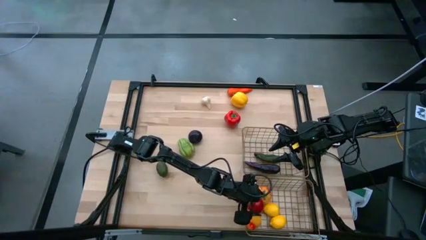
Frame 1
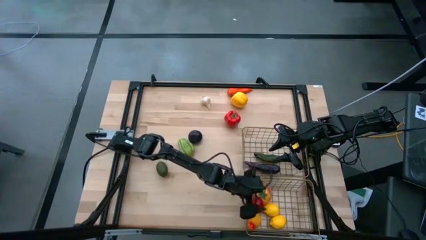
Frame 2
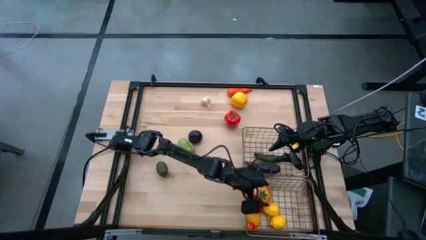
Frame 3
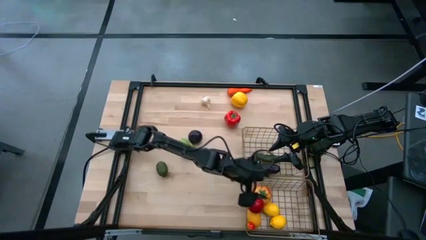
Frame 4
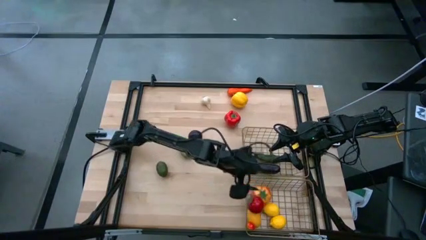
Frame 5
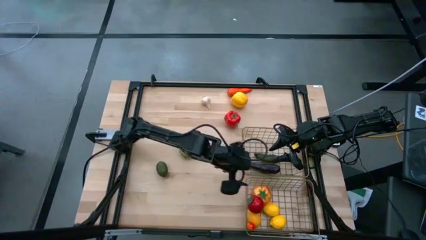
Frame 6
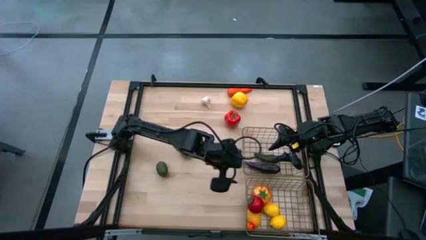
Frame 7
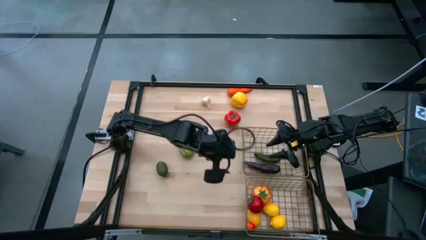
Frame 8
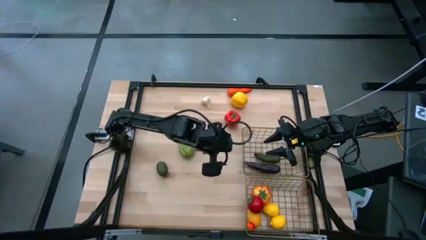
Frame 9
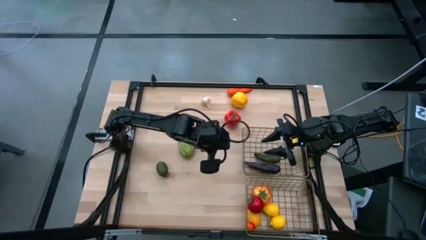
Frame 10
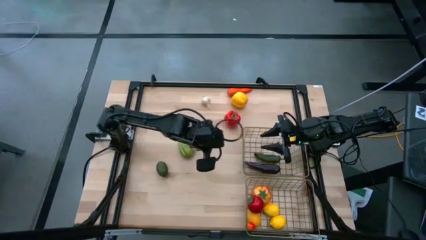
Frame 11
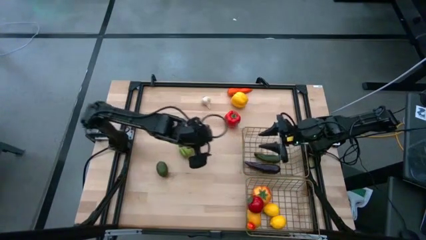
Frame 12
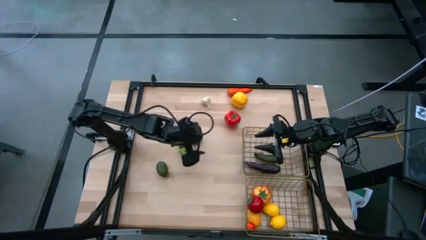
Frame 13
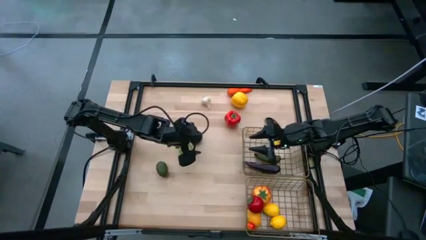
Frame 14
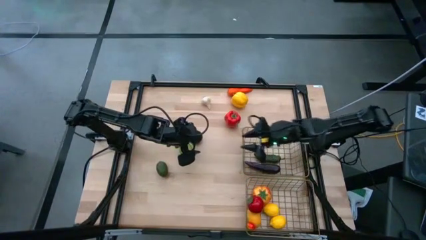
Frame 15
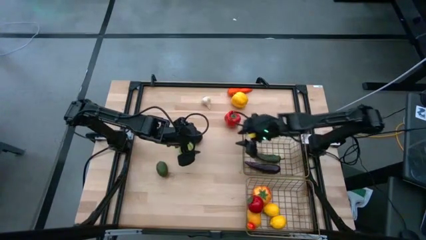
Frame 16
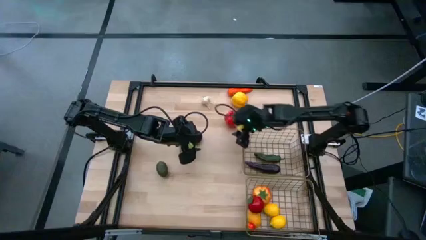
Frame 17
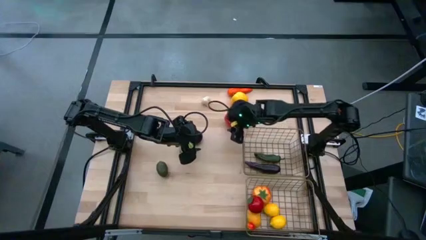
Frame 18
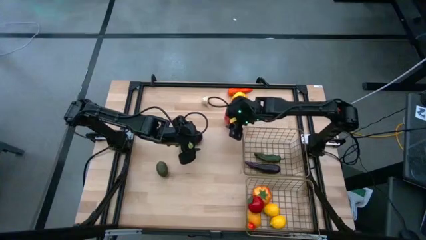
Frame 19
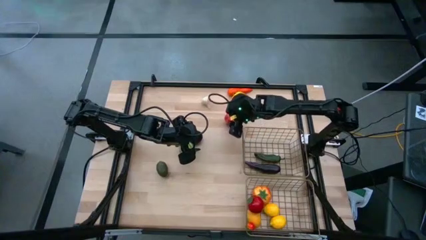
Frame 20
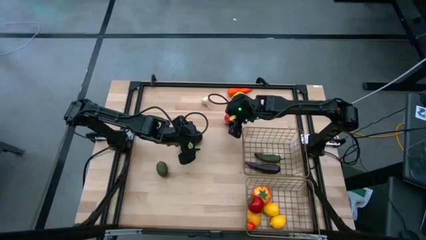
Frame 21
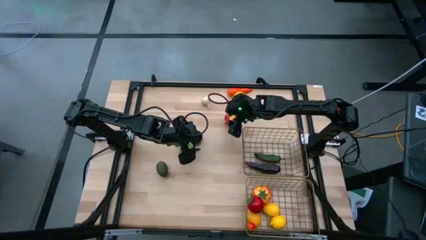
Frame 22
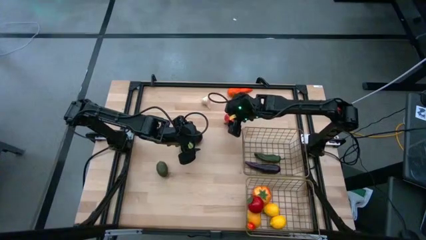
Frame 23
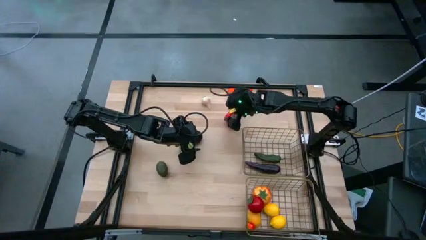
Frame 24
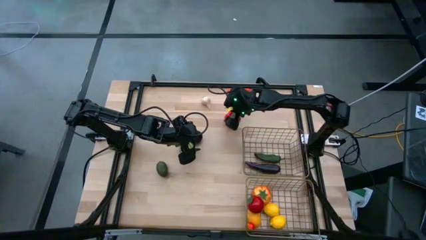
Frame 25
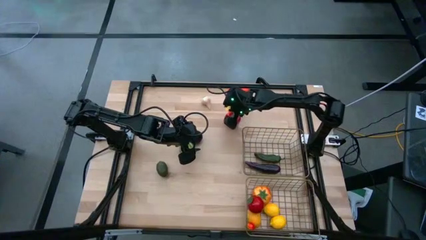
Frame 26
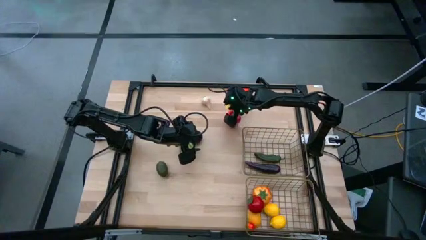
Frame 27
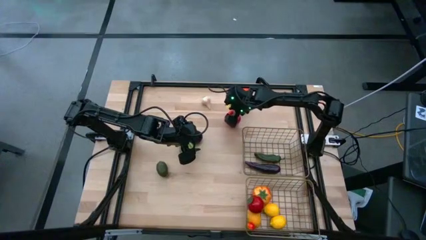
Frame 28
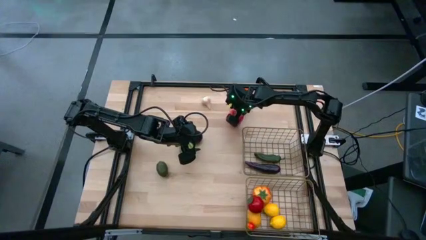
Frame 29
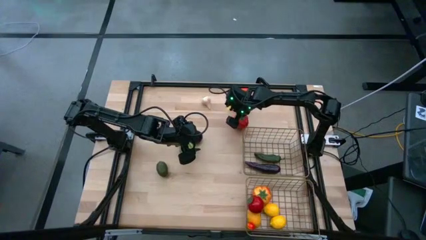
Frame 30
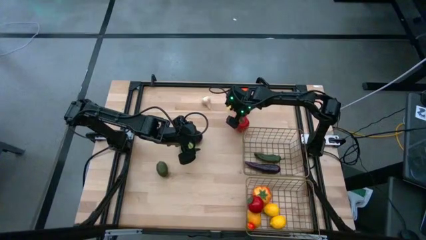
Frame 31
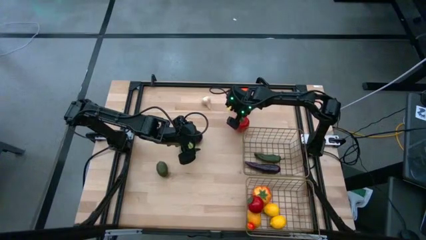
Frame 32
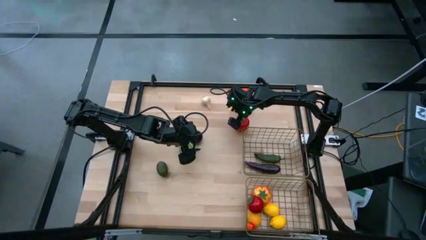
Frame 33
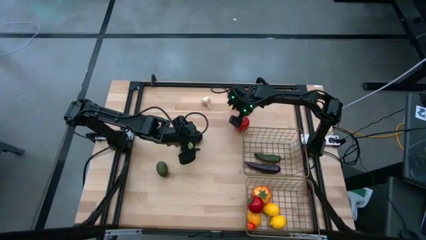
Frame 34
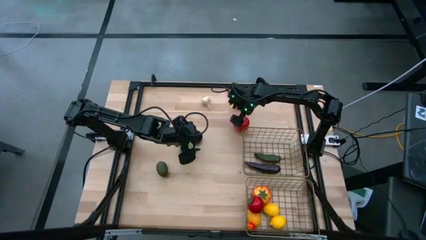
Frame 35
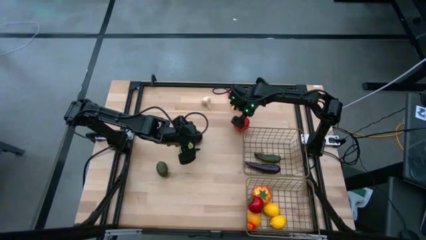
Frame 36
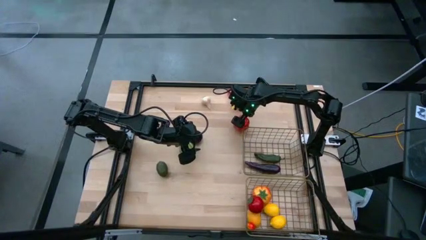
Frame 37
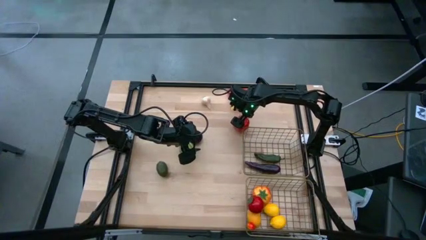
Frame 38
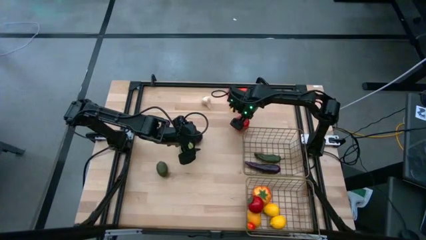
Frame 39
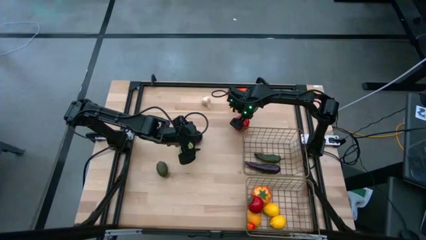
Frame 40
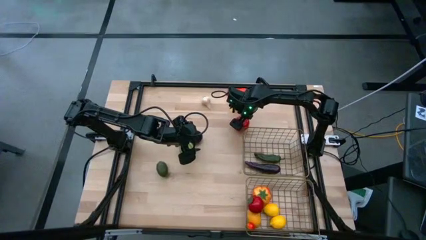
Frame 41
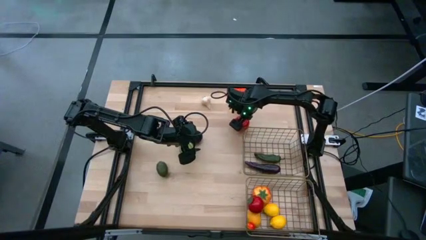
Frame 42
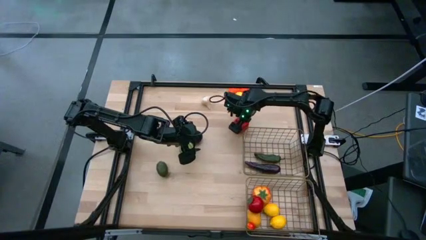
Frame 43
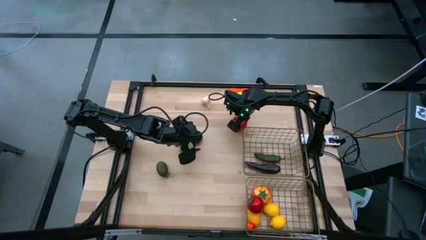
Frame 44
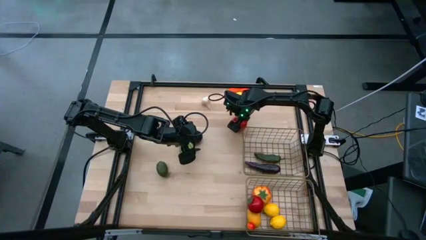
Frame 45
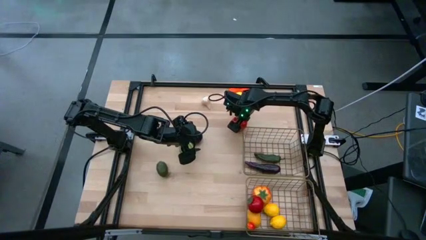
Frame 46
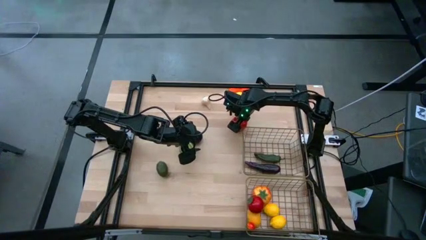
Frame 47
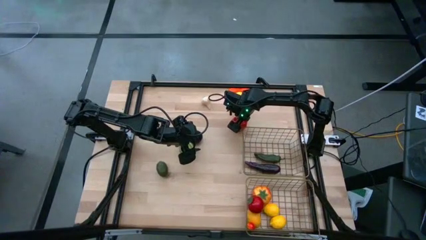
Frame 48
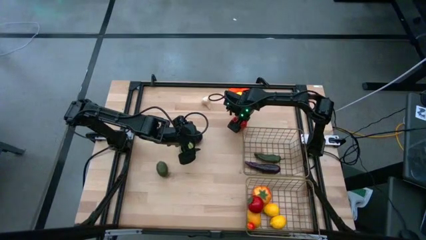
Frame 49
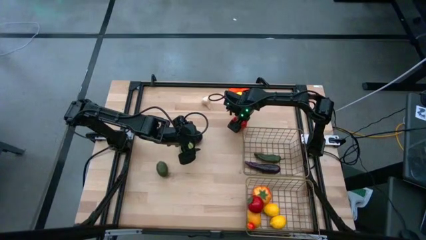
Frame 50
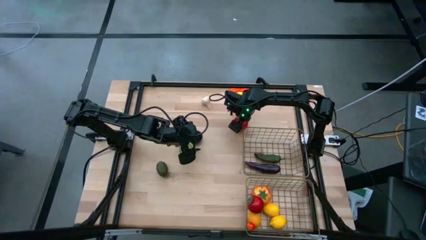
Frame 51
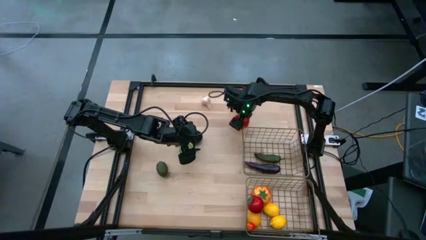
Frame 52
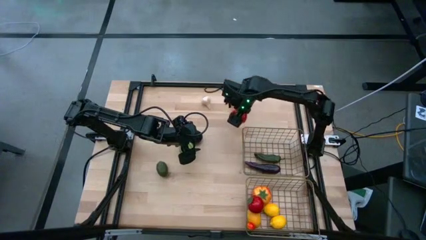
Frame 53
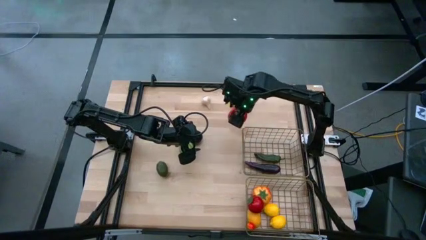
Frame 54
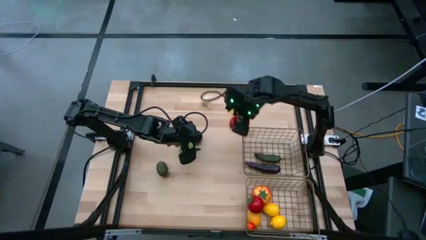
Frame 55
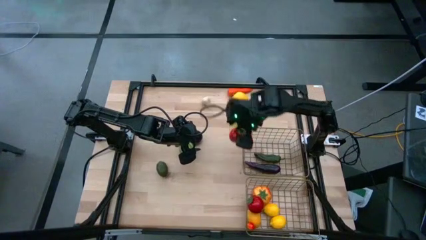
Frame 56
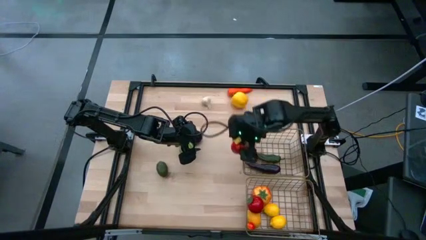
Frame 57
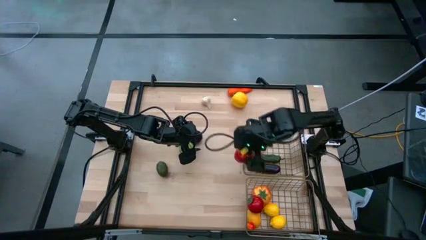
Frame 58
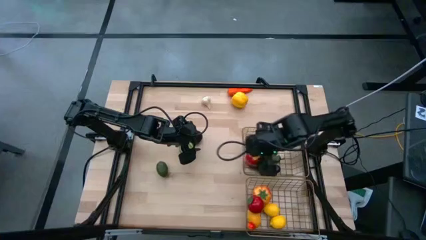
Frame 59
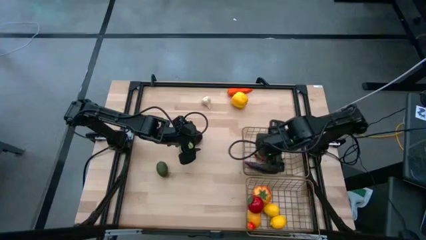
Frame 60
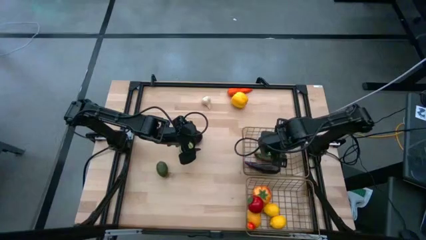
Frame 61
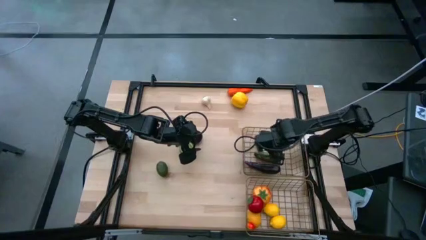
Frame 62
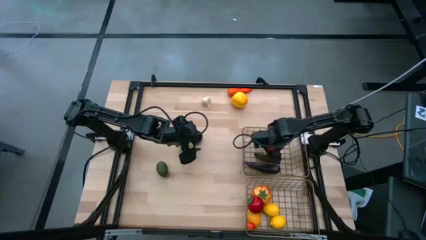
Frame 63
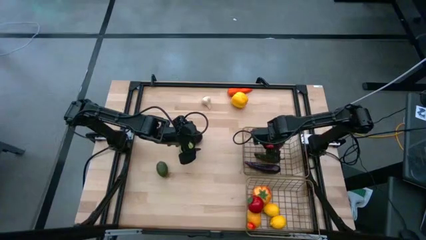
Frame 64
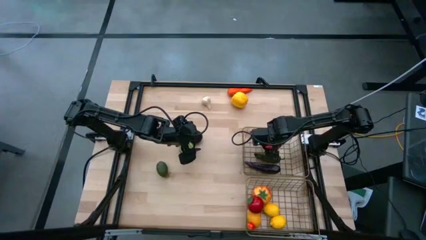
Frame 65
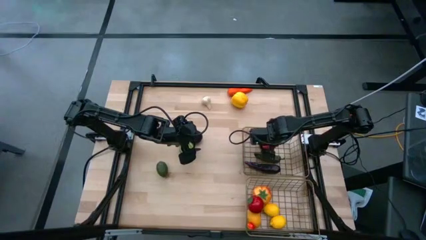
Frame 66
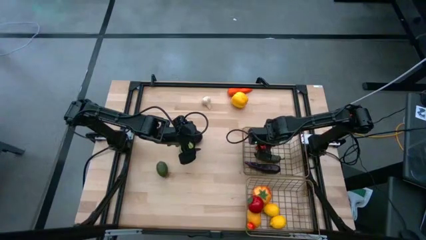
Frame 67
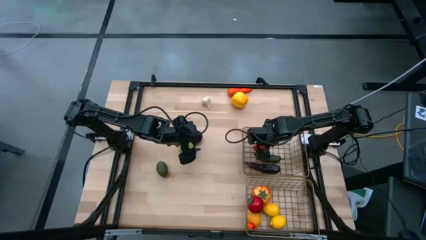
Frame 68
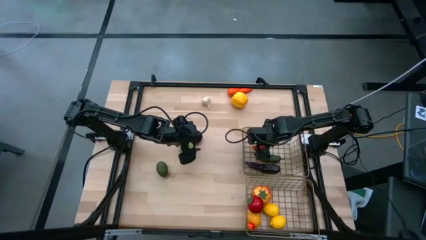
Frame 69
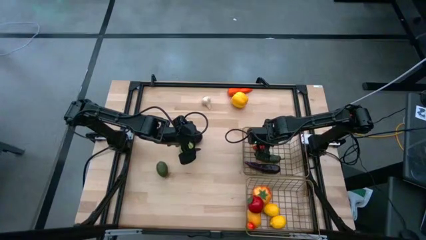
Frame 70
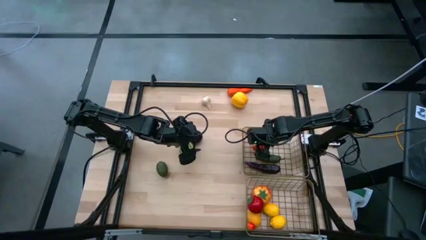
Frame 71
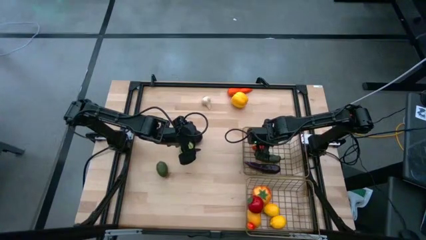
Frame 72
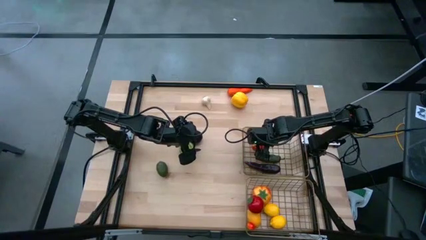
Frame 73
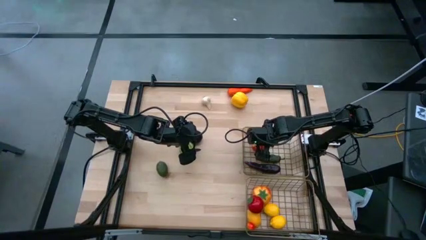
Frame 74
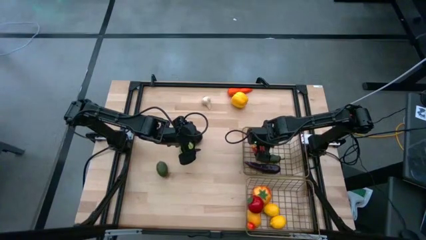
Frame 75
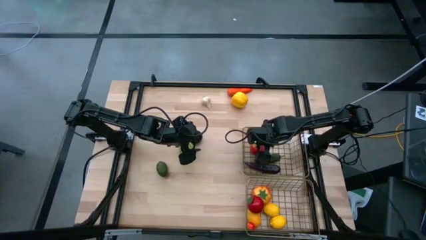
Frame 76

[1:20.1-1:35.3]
Task: Sort produce into baskets
Put the bottom red bell pepper into the top wire basket

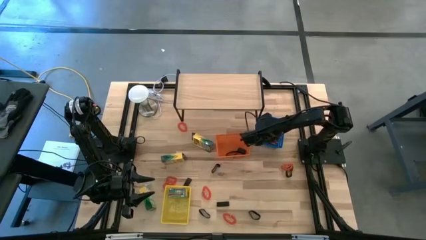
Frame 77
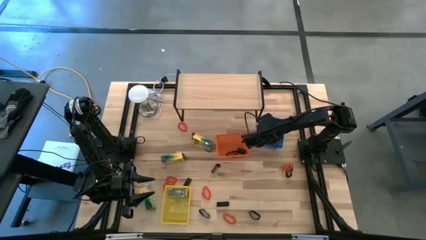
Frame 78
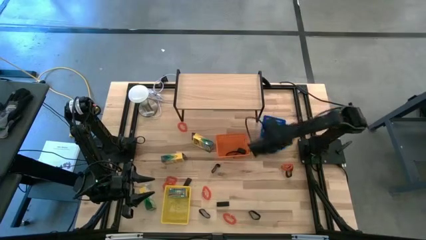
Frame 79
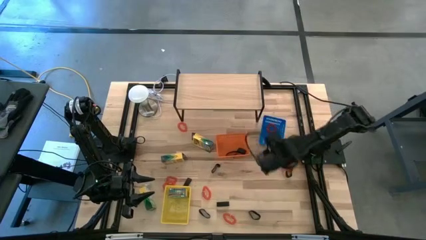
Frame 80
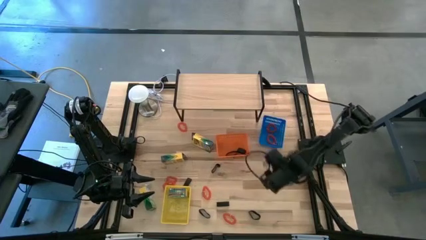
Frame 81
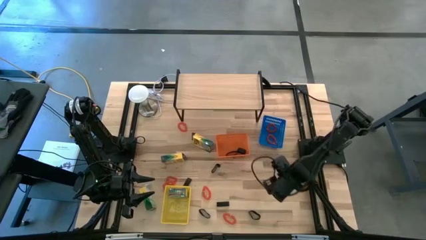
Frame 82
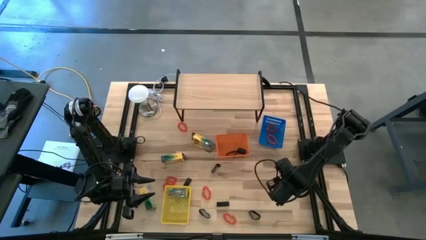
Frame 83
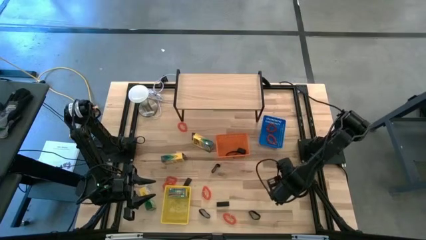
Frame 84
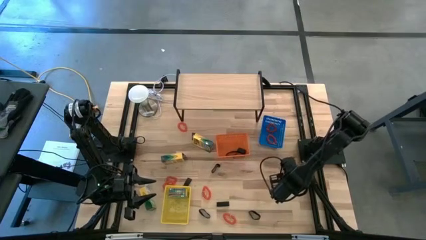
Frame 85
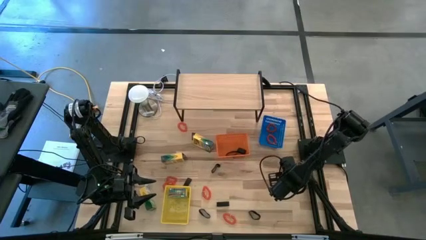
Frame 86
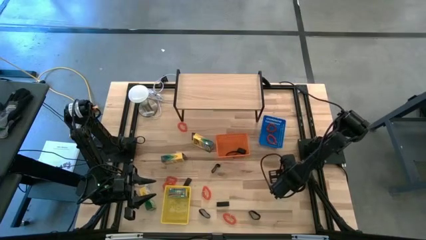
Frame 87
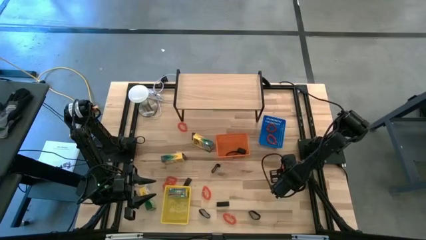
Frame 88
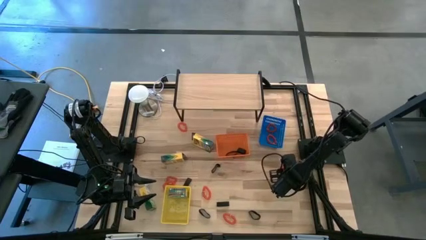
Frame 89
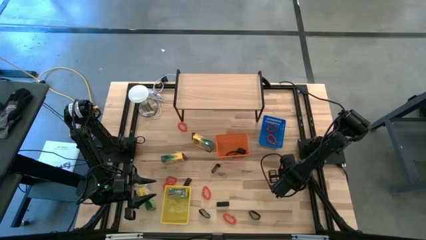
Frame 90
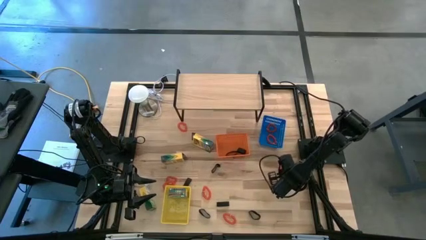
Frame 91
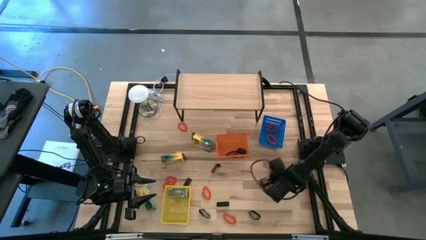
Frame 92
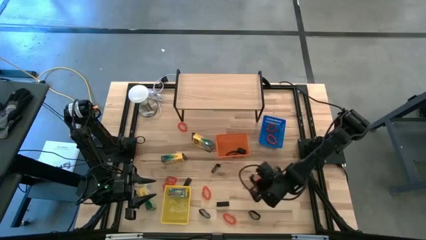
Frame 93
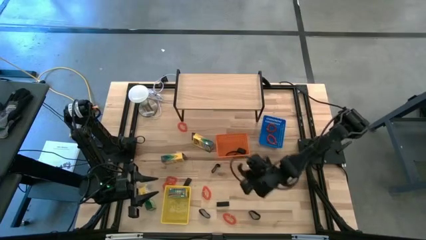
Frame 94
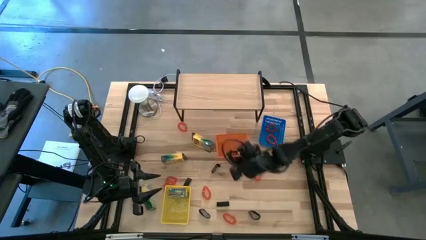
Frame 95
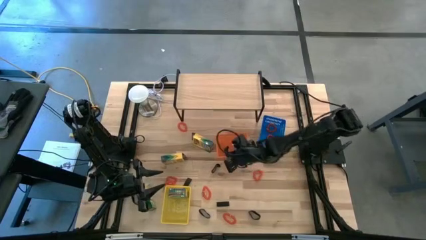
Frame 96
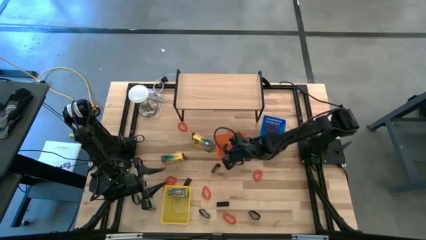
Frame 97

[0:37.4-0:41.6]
Task: Pick & Place Office Desk Supplies
Put the rubberband into the orange bin
